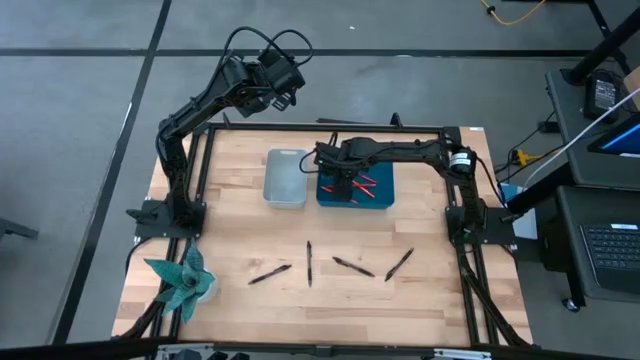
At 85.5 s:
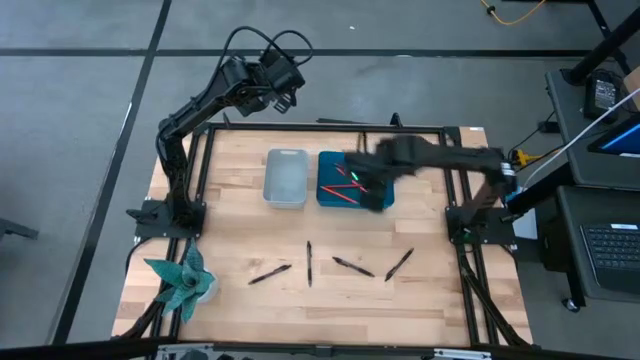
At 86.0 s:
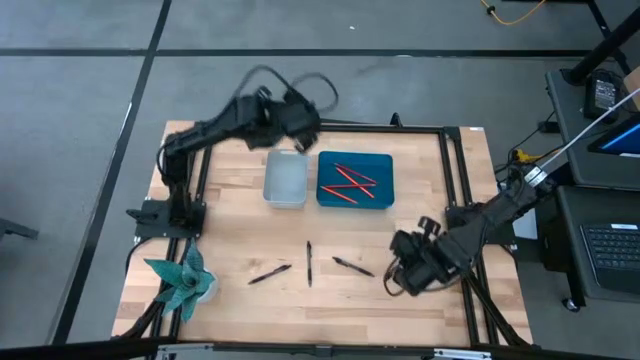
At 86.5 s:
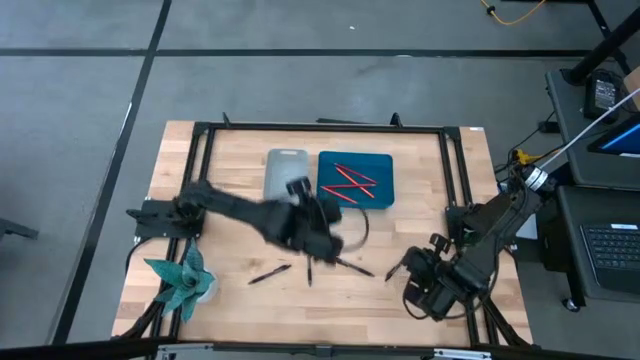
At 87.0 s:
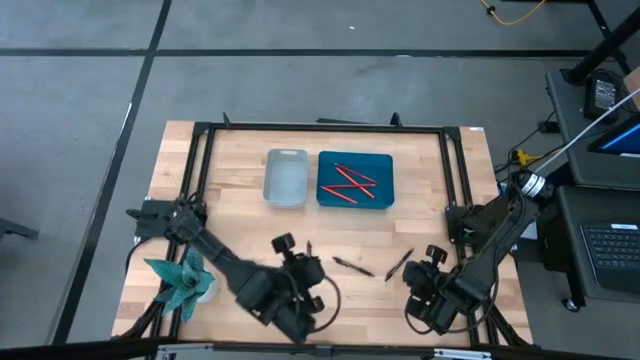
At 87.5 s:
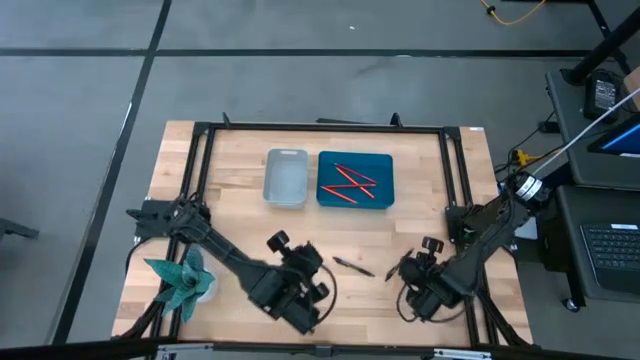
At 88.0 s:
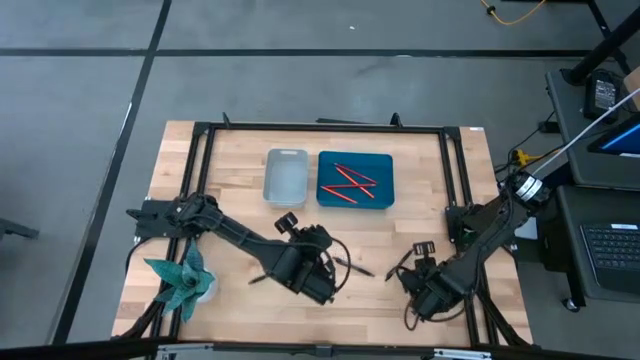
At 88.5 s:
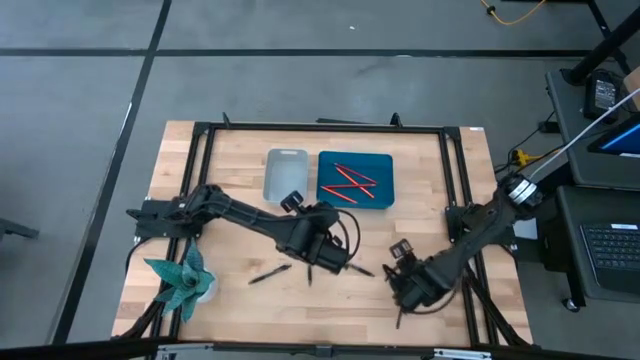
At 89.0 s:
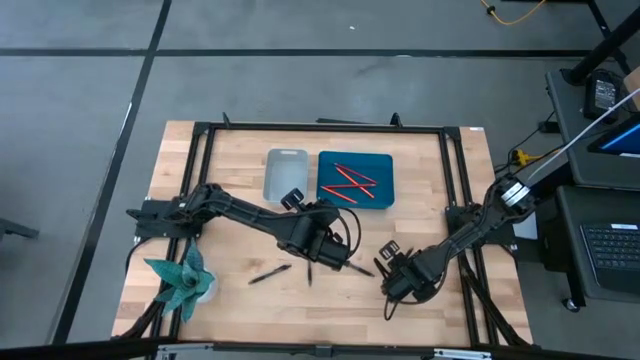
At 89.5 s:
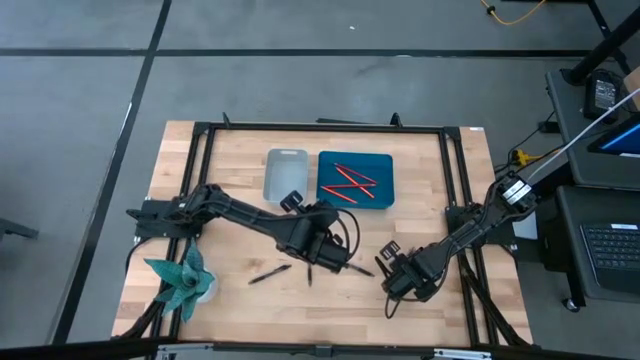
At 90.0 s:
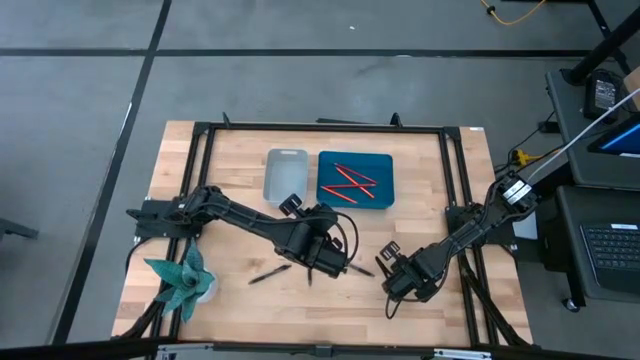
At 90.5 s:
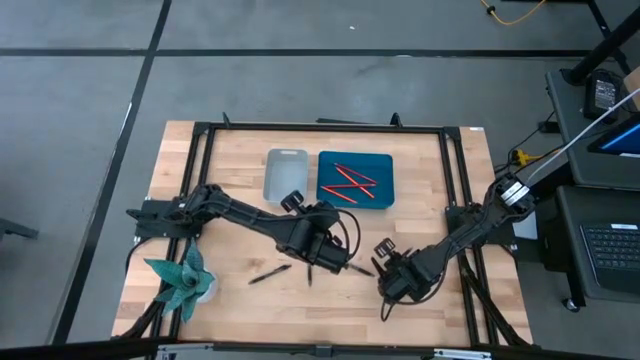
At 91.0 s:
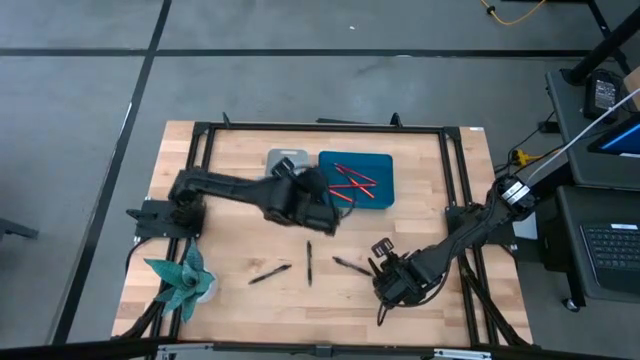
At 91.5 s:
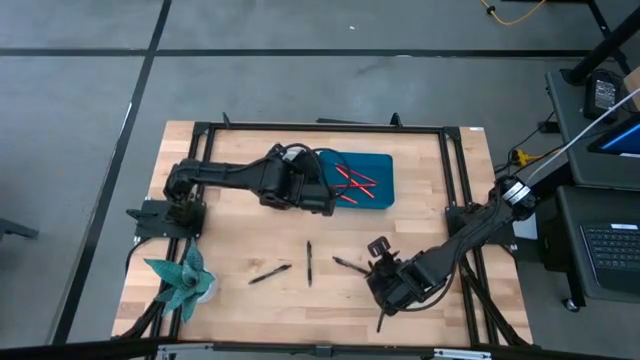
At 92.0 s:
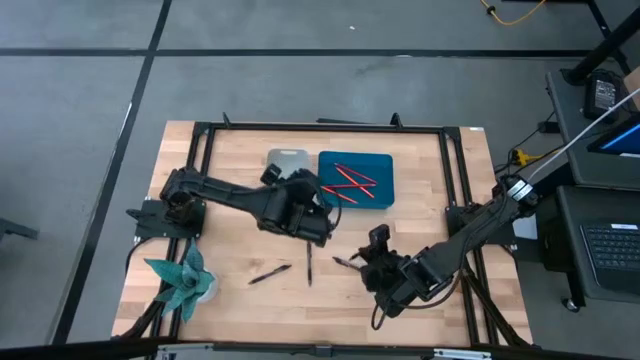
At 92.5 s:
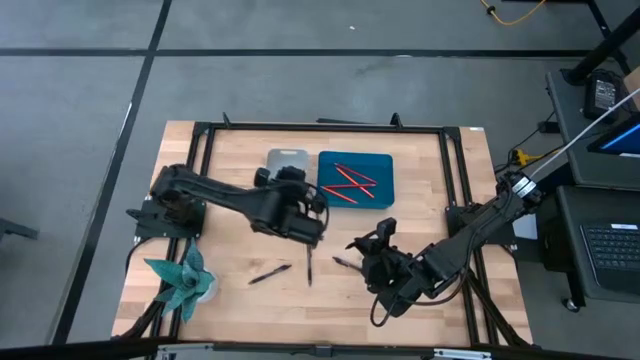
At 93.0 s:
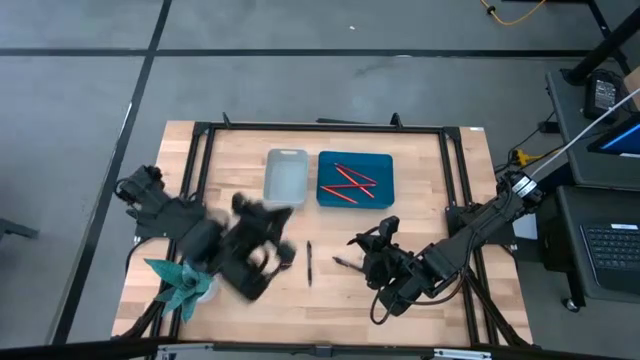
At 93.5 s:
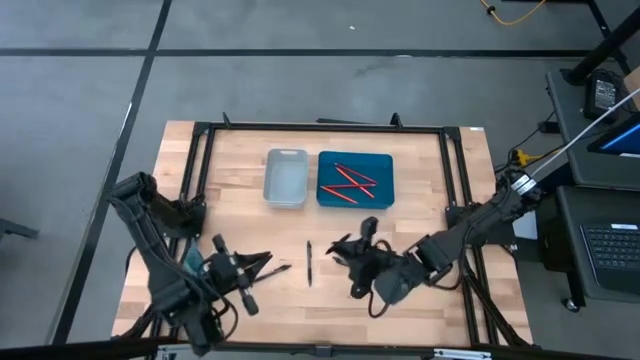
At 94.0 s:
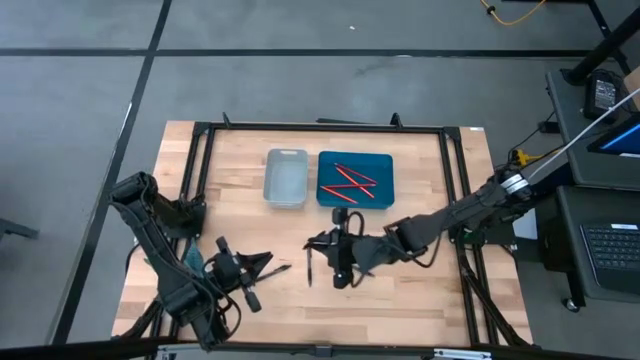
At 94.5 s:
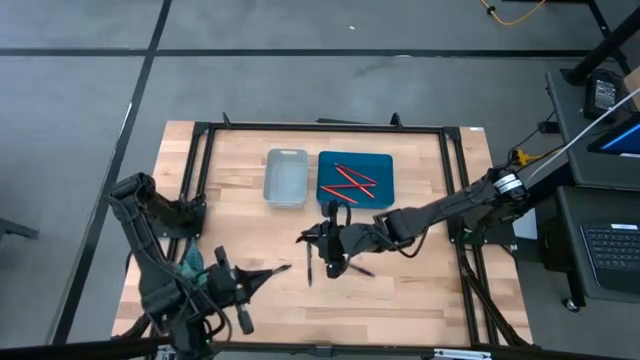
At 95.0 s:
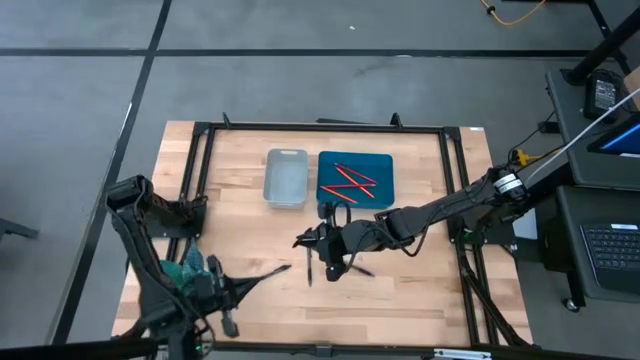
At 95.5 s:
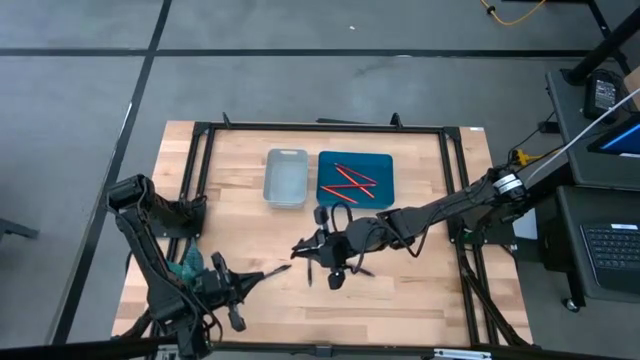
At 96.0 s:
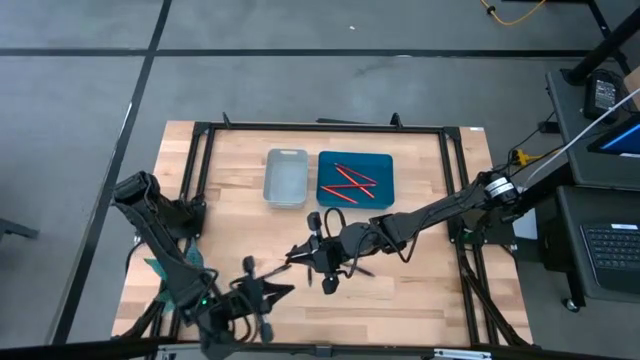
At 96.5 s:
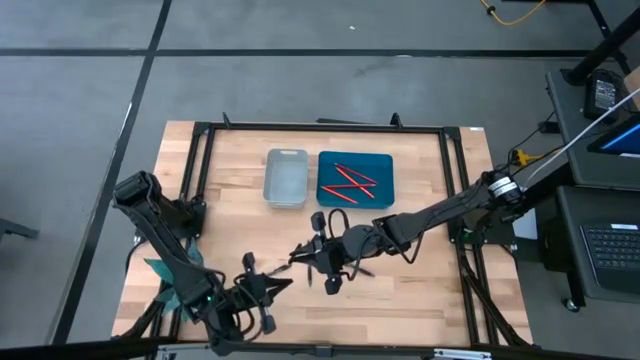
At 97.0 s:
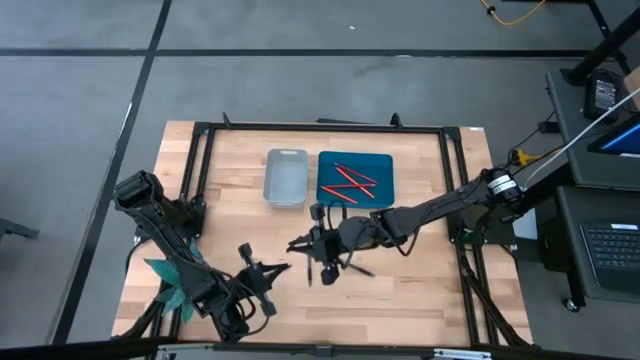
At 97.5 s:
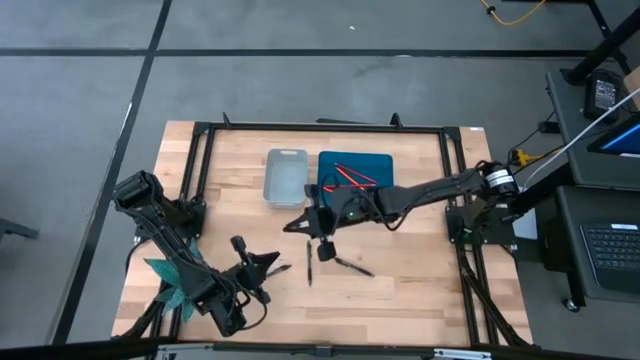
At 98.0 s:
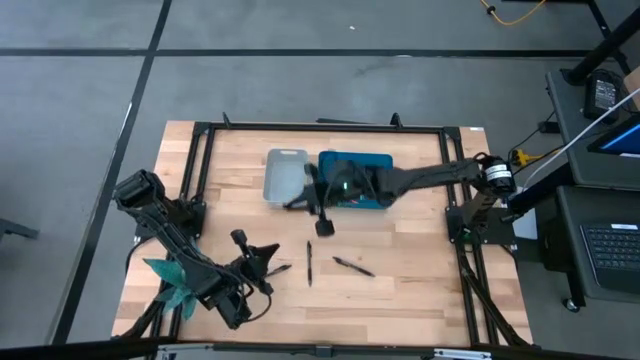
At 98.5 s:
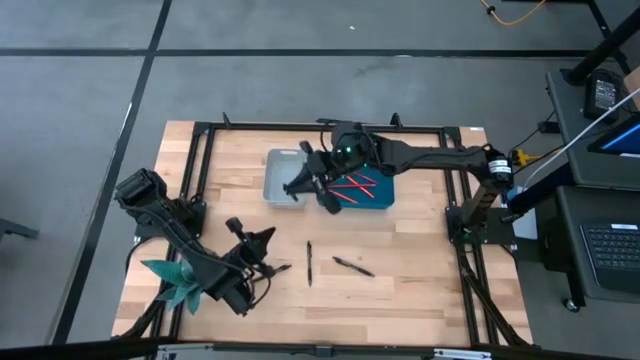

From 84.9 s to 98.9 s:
Task: Sort pens & pencils
Put the black pen into the gray bin

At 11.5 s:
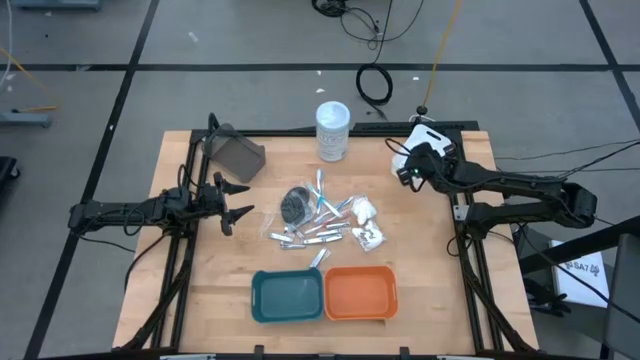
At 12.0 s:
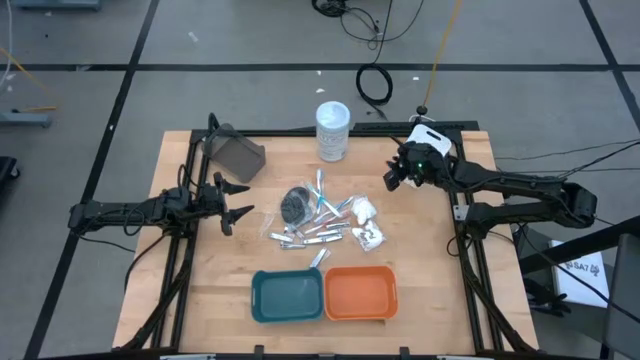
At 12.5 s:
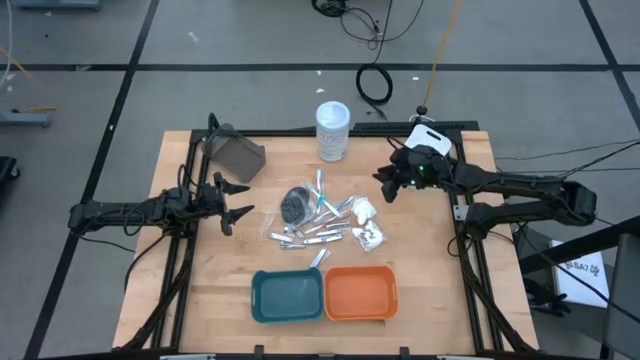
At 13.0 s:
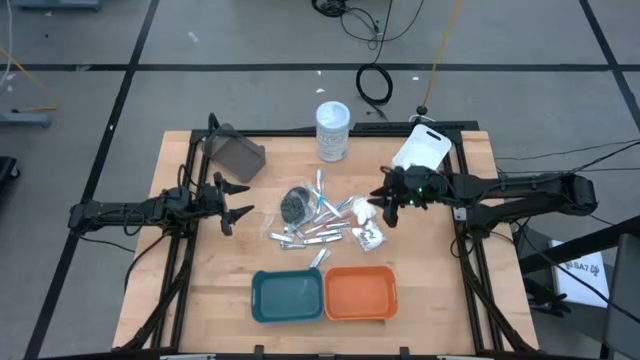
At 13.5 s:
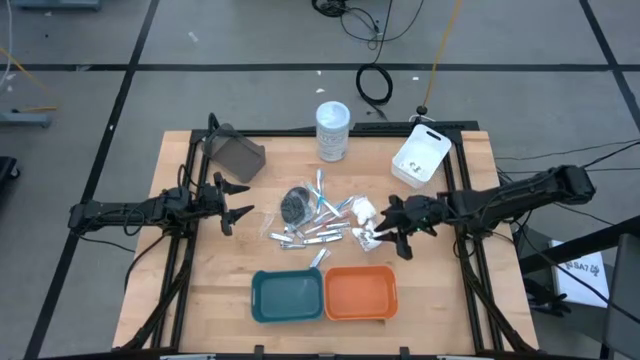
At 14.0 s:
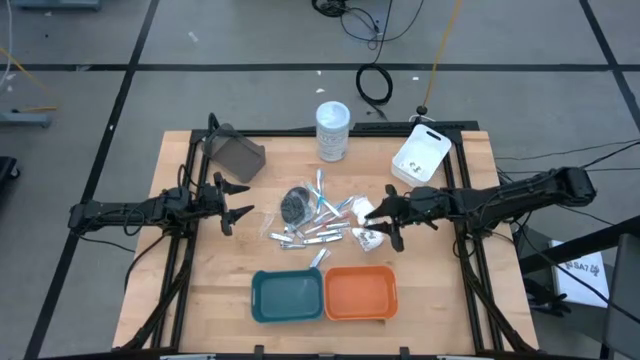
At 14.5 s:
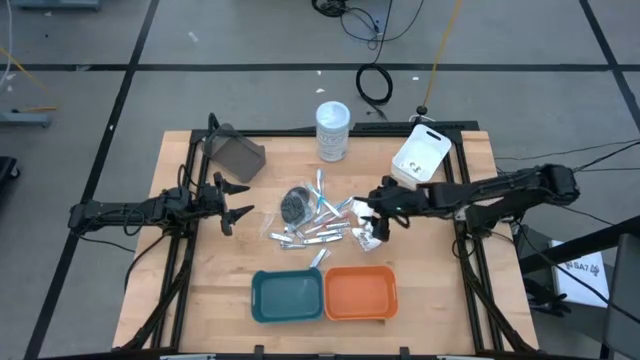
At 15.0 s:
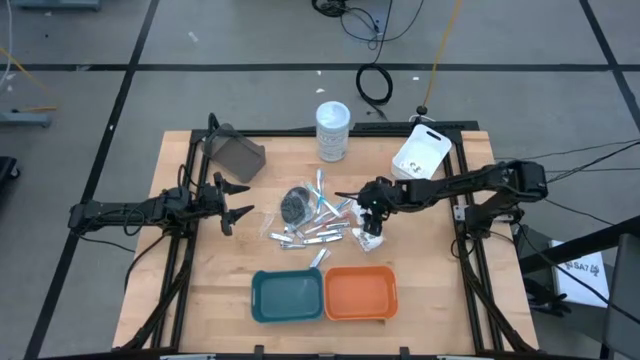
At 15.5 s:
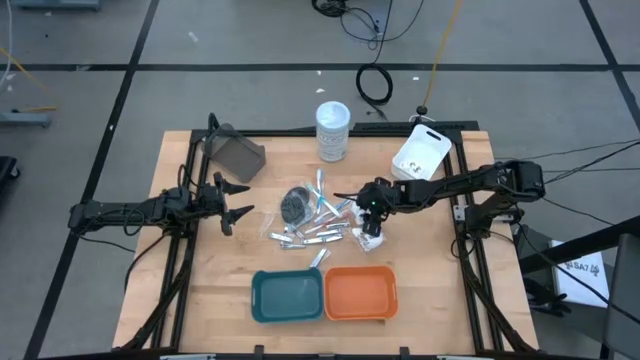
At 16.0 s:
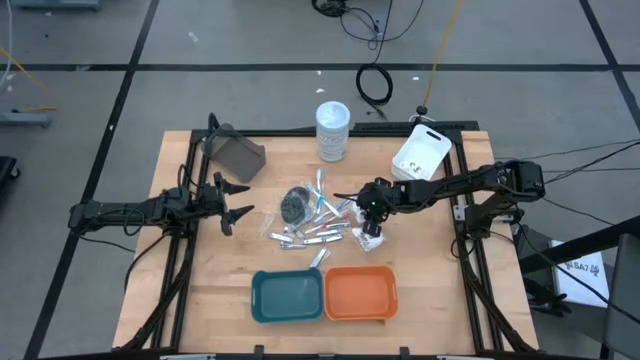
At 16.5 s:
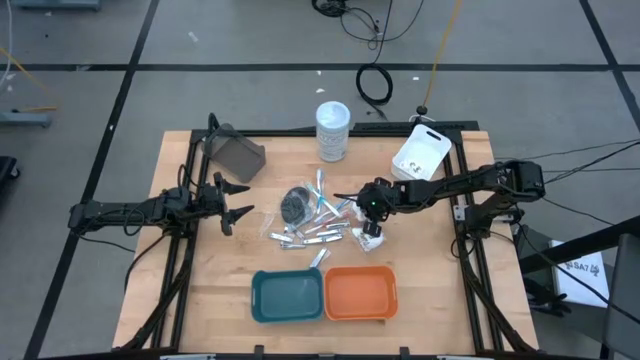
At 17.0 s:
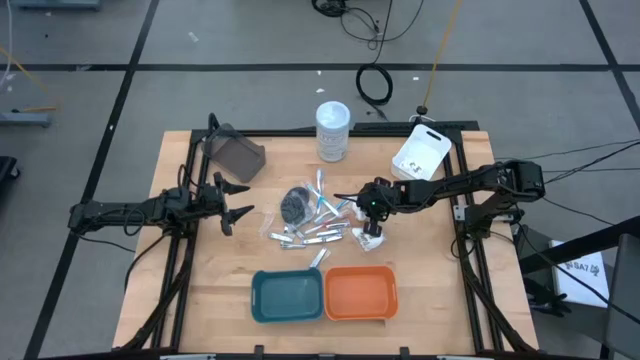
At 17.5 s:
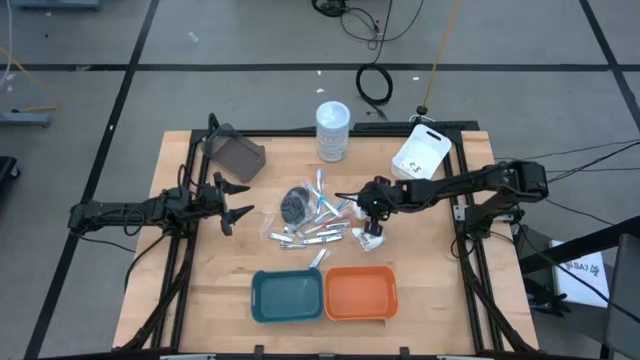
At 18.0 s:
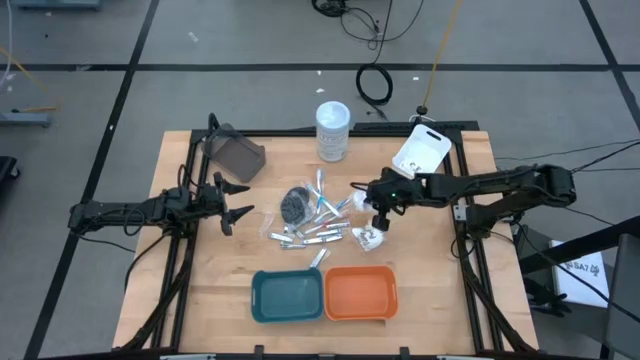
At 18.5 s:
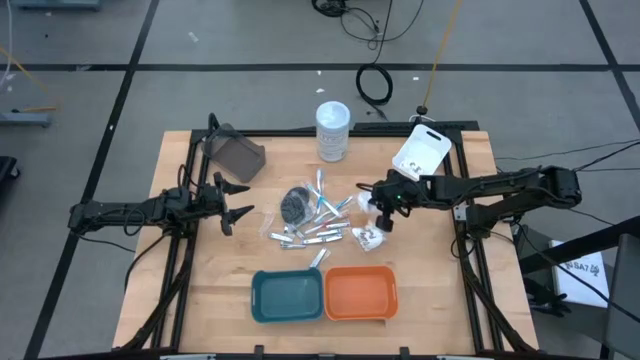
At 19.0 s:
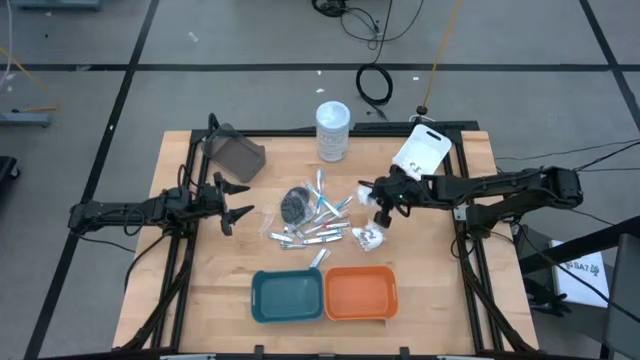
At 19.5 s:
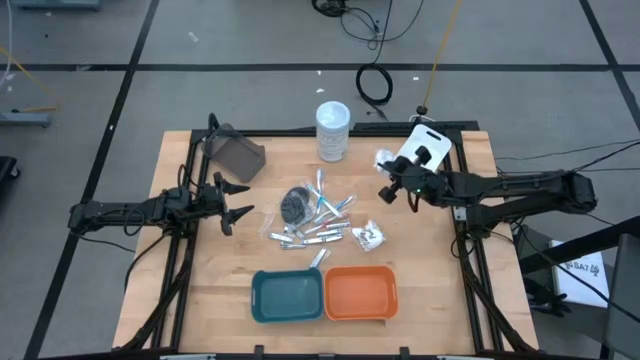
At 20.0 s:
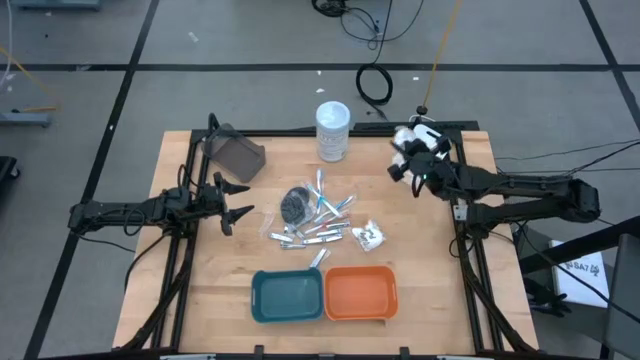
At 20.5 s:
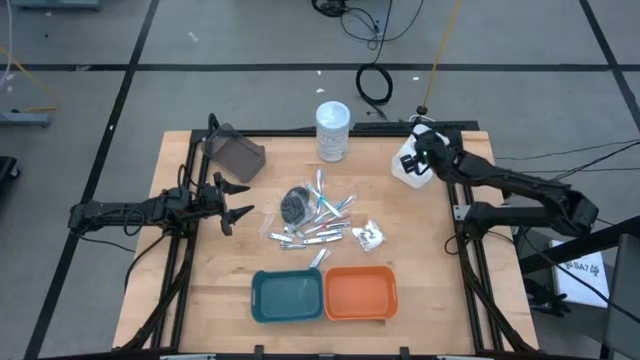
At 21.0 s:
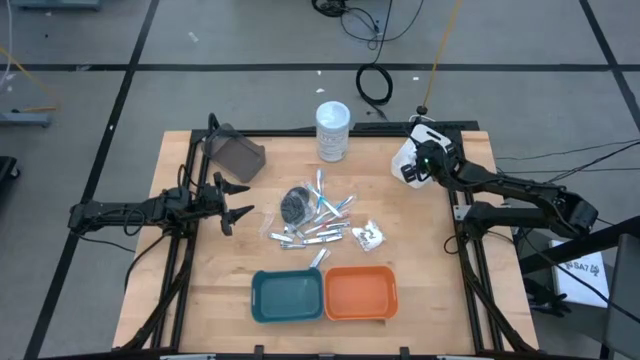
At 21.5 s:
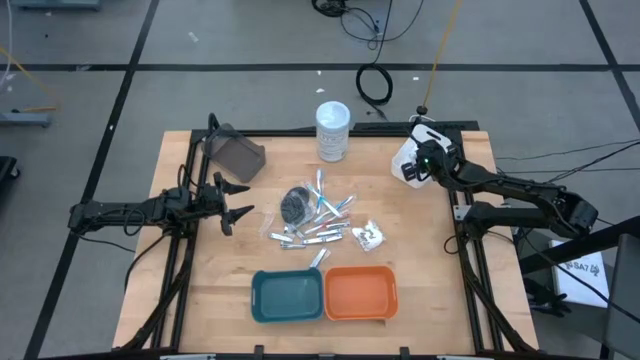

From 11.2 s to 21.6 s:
Task: Pick & Place Travel size toiletries
Put the white cotton pack into the white bin
